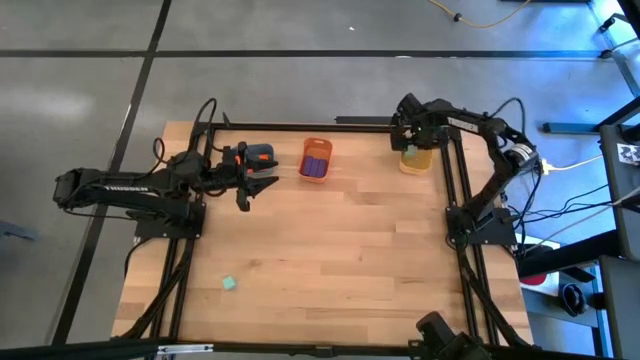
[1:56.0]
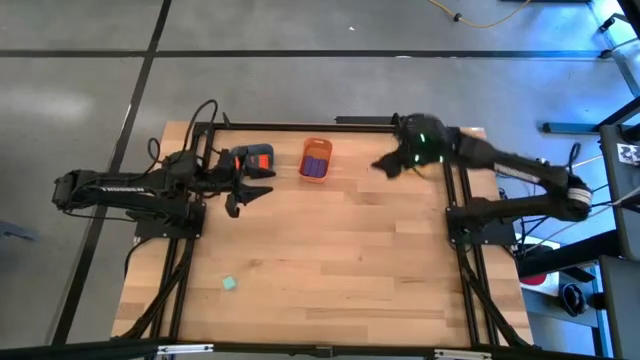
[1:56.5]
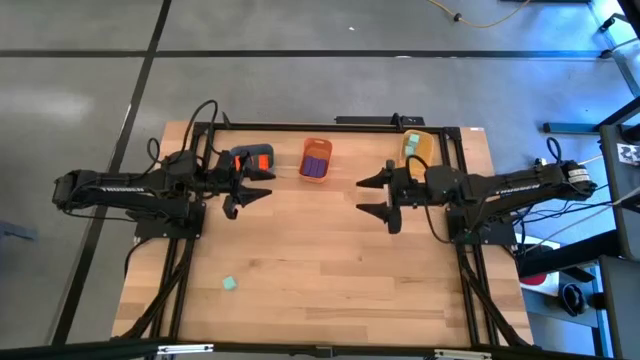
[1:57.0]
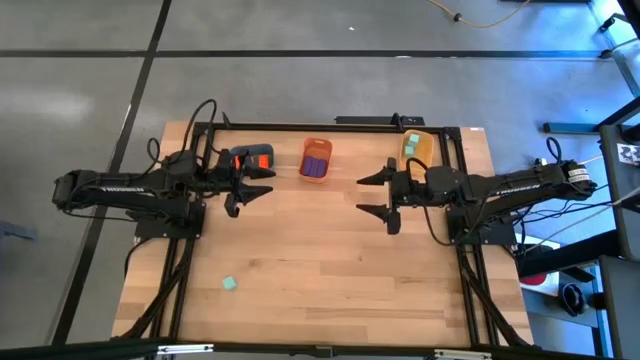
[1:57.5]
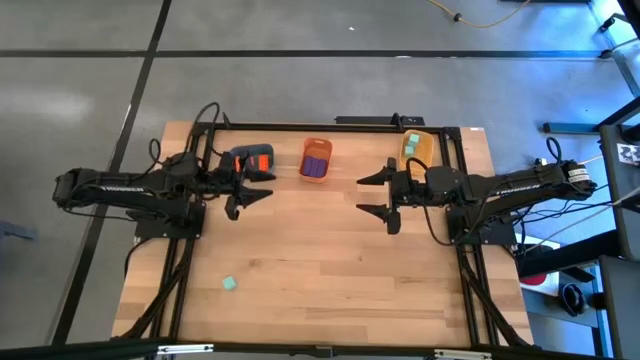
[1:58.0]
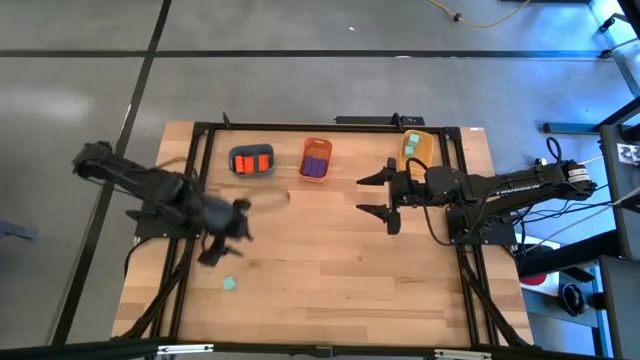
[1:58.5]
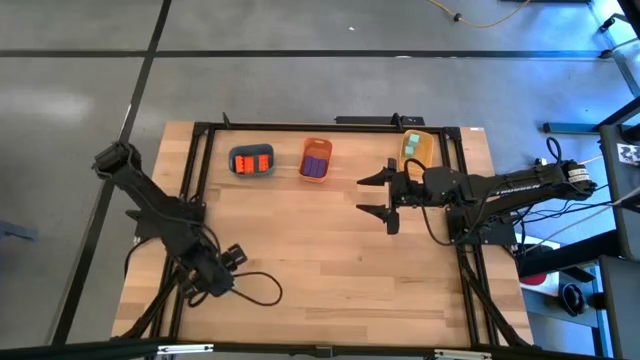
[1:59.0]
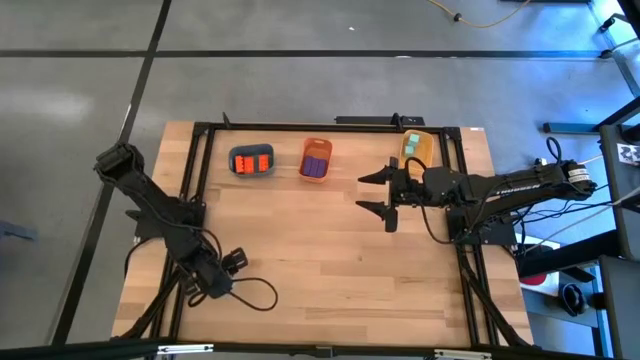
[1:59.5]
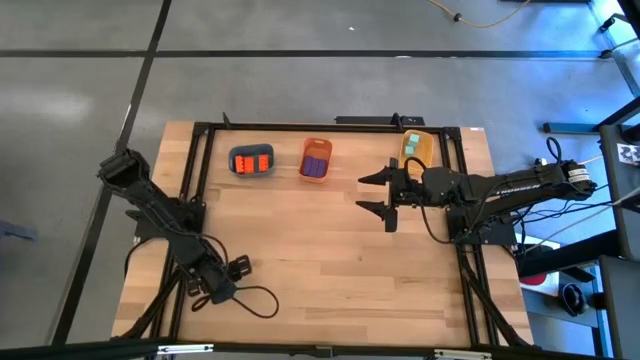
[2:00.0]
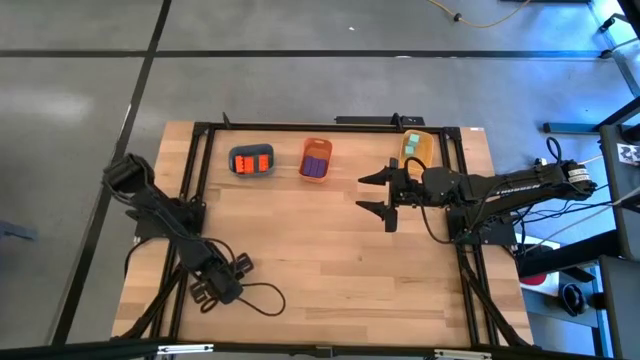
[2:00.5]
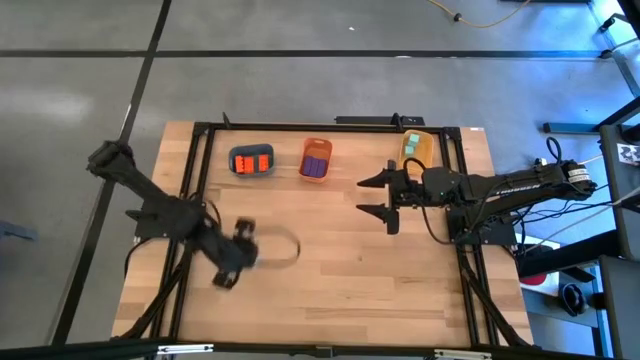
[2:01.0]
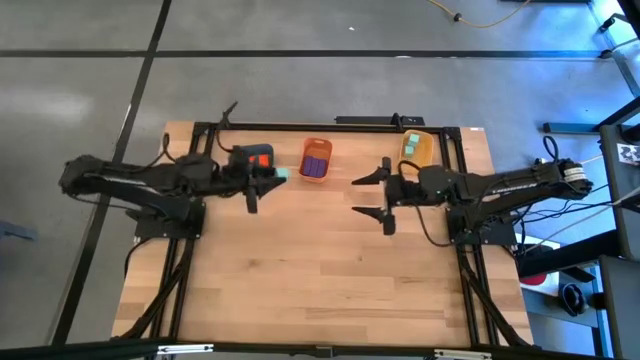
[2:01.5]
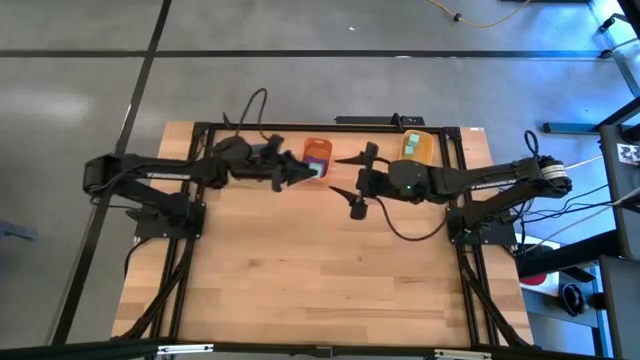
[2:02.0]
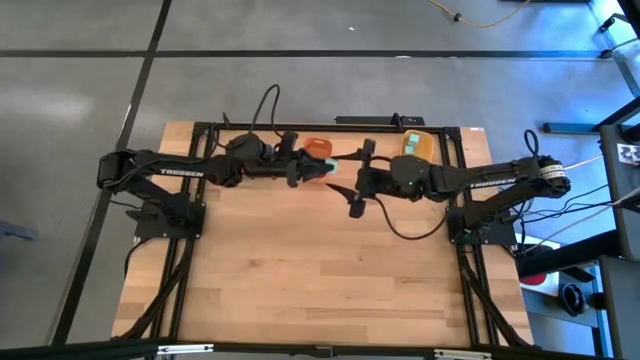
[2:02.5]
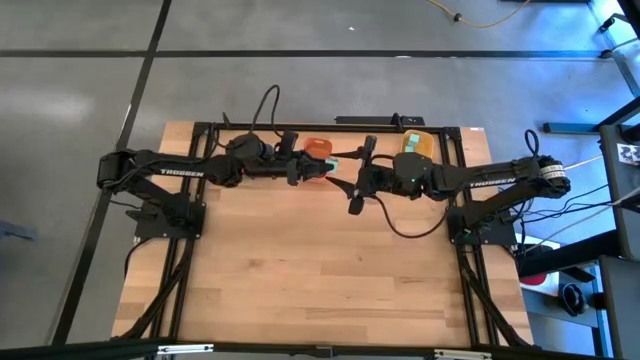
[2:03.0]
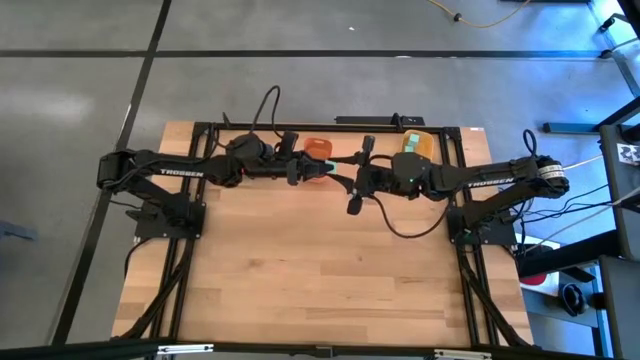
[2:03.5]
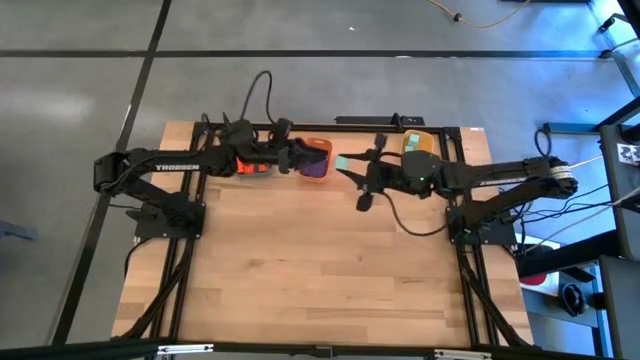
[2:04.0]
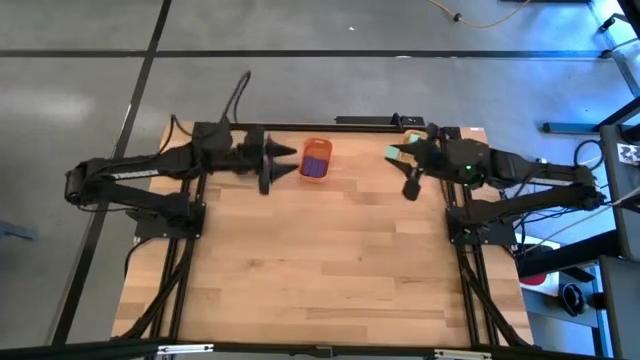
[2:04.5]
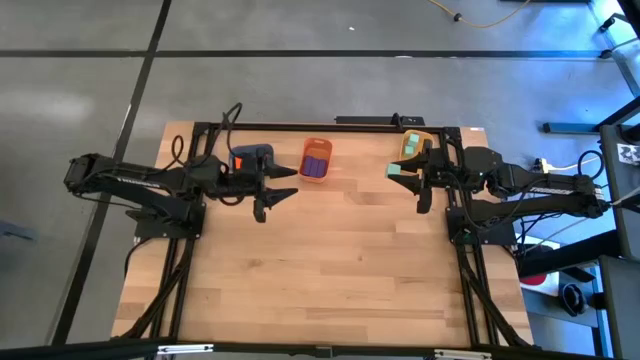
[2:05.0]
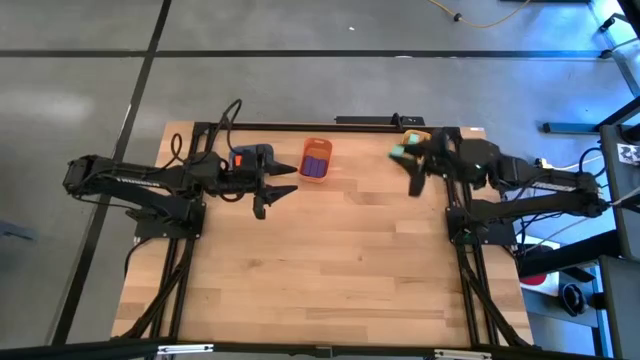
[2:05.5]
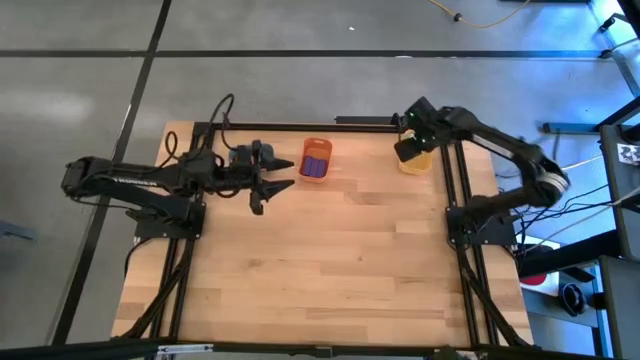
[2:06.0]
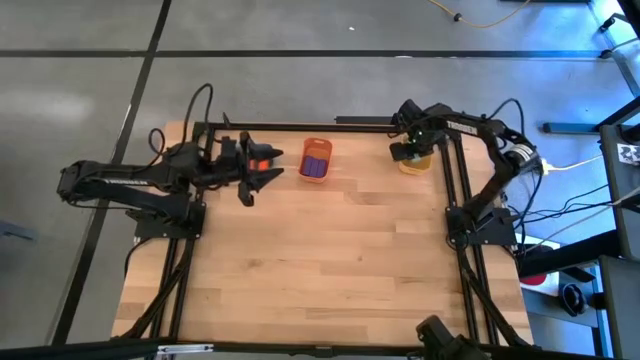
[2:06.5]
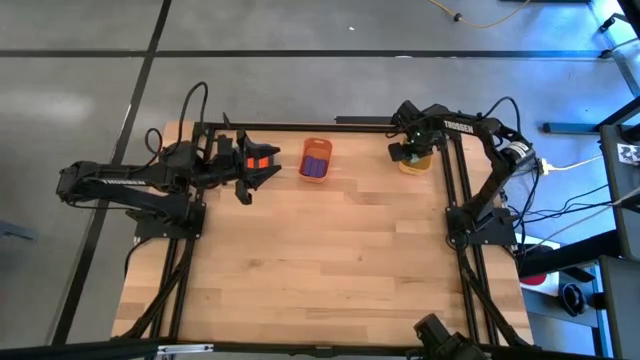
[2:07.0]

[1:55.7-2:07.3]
Task: Sort & place blocks by color
Put the blue block into the yellow bin

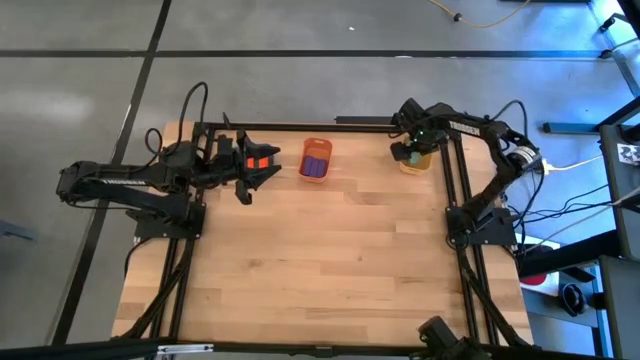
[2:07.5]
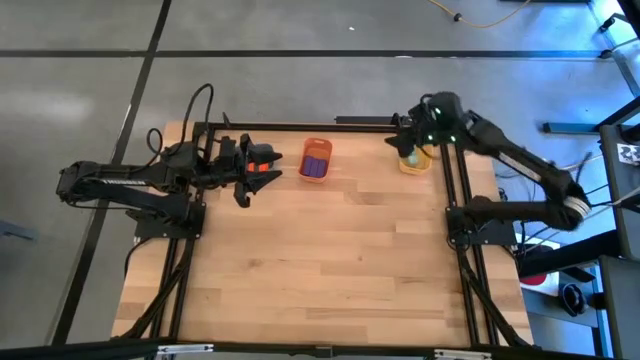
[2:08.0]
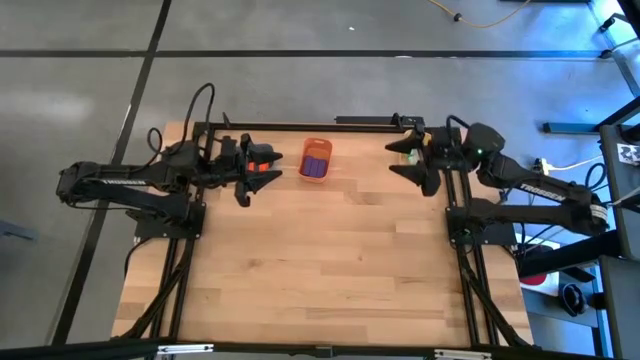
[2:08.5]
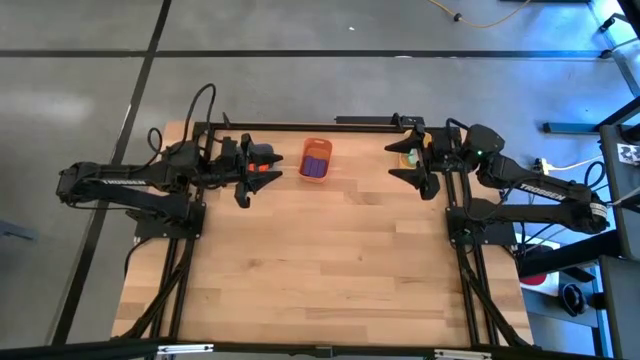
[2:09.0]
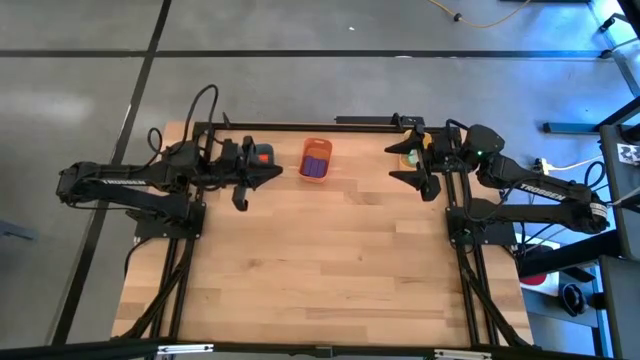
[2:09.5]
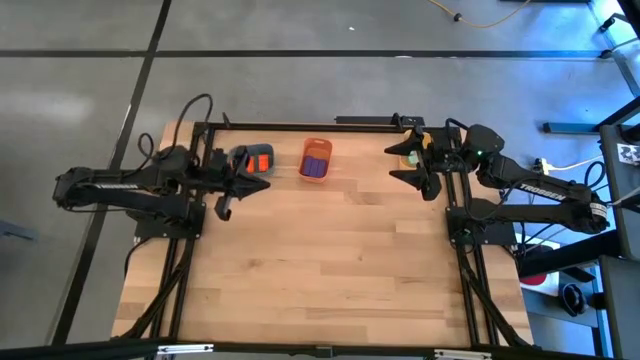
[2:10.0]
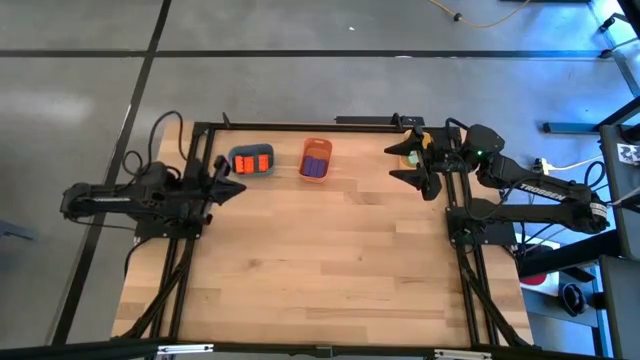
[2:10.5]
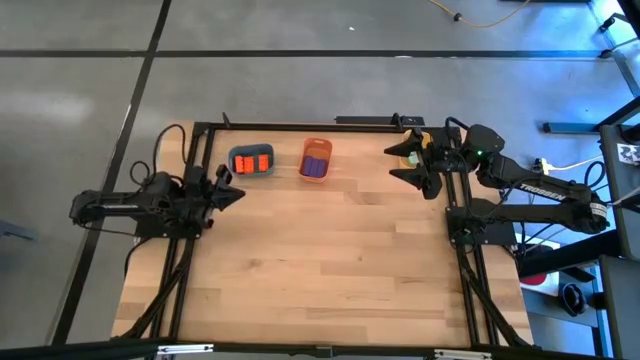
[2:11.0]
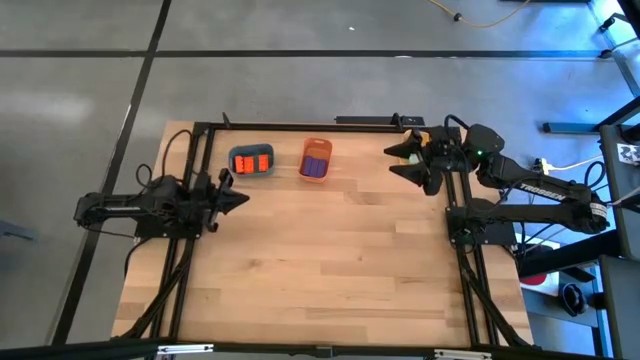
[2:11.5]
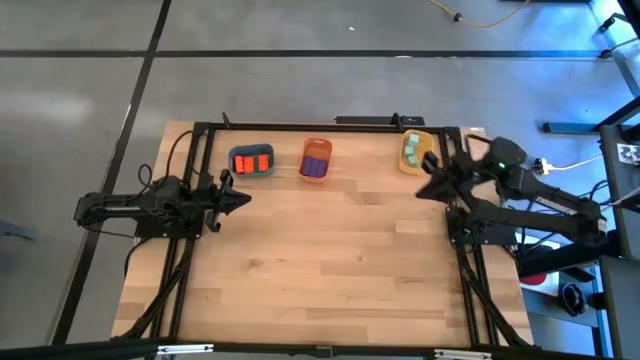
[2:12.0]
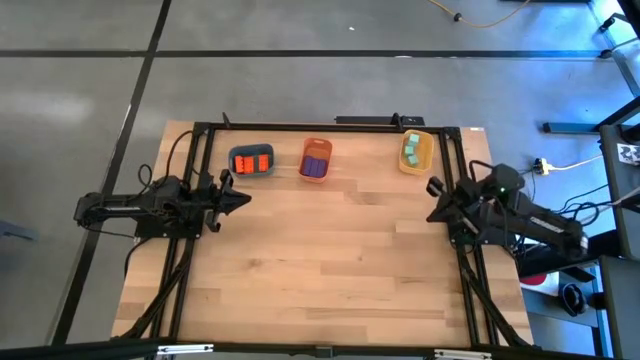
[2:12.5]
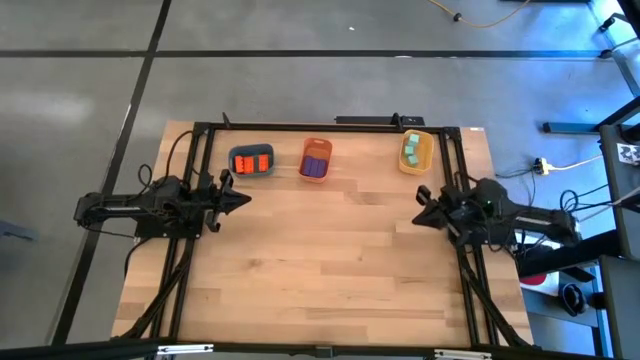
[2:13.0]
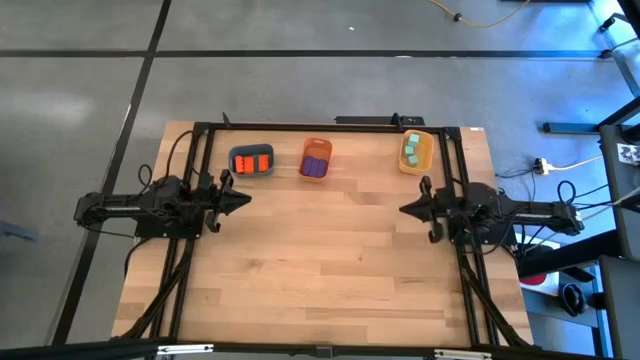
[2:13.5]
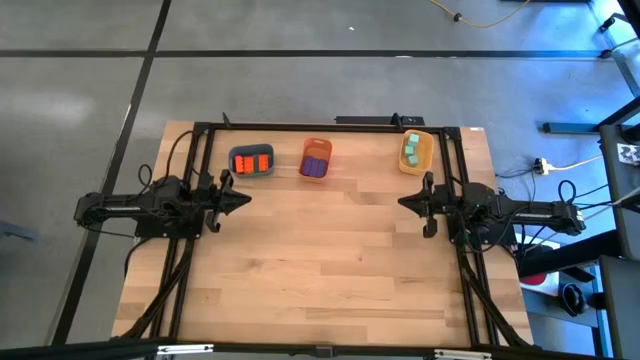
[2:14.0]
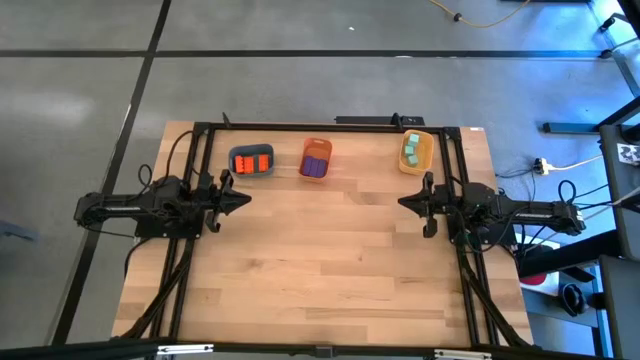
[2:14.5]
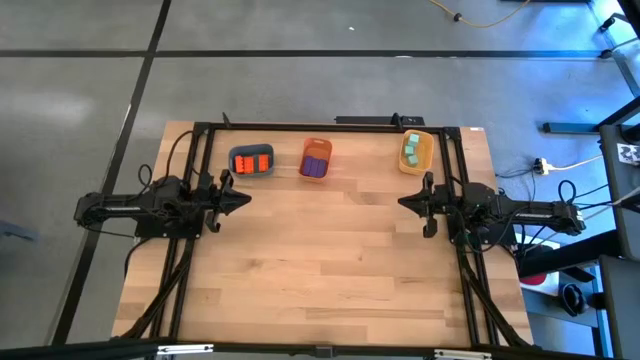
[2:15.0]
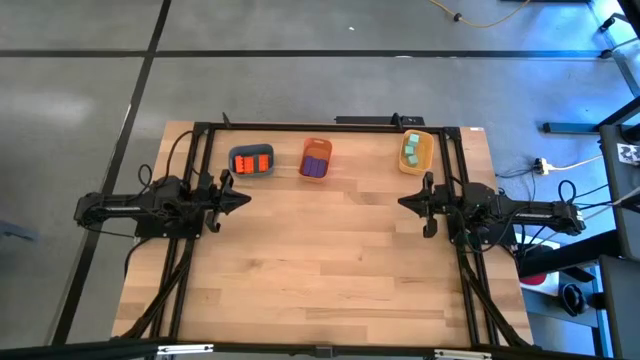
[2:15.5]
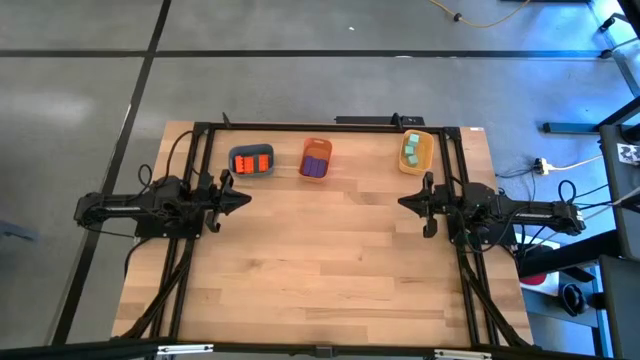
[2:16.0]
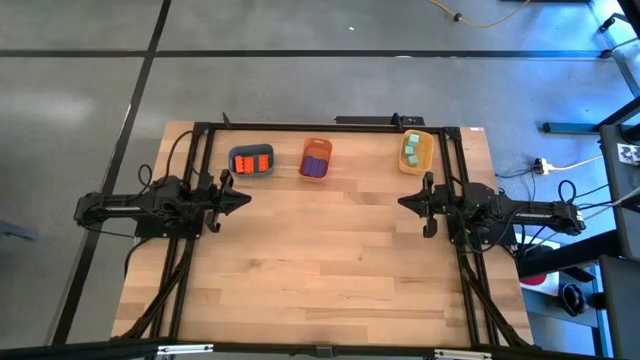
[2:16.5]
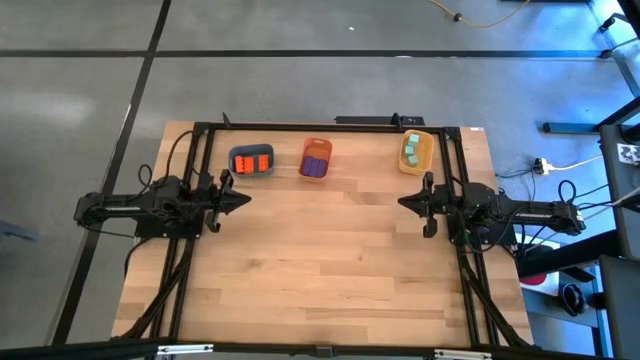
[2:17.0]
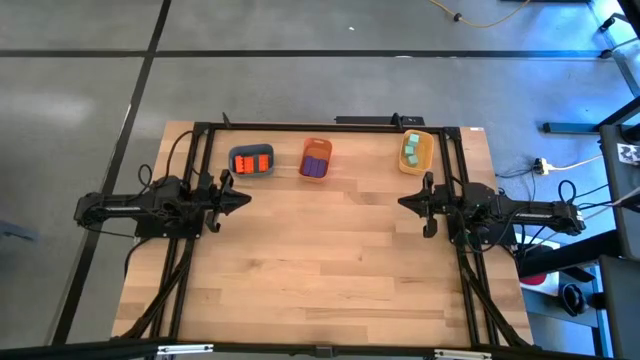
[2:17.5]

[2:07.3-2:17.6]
Return to Home Position
